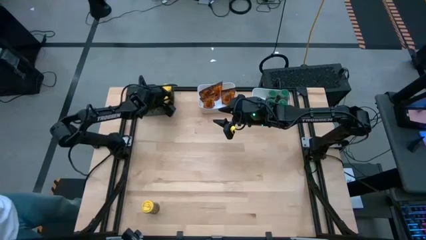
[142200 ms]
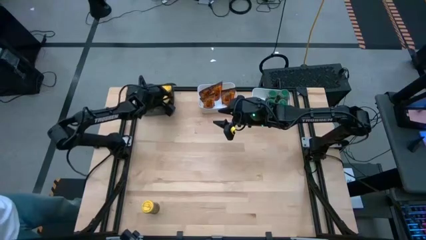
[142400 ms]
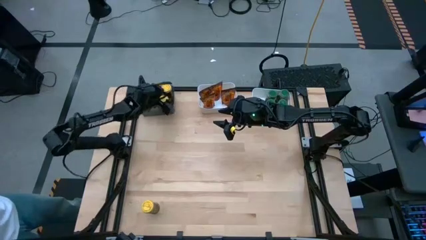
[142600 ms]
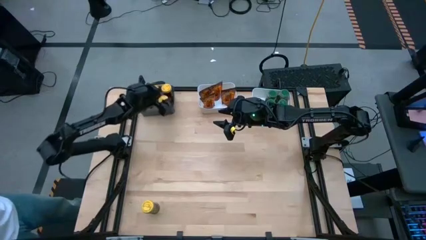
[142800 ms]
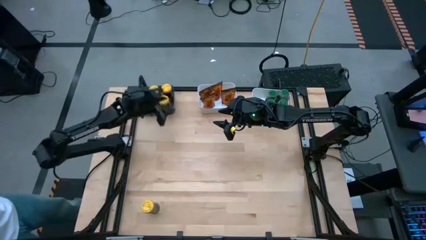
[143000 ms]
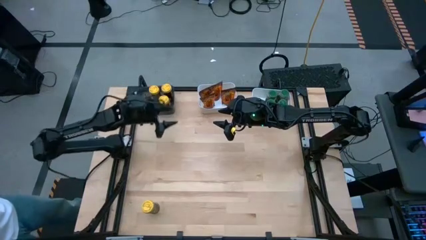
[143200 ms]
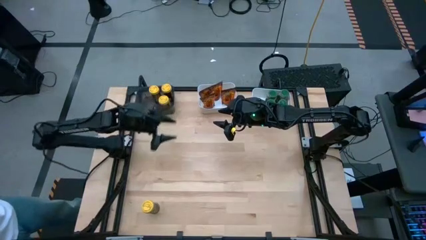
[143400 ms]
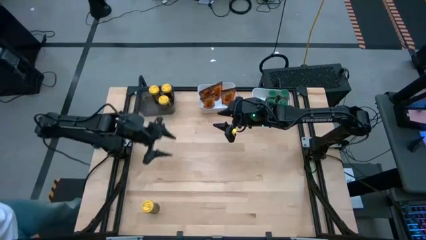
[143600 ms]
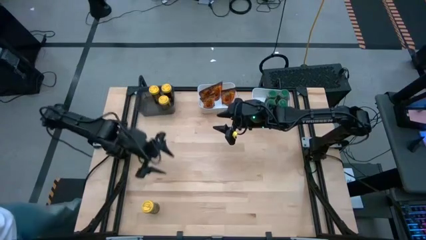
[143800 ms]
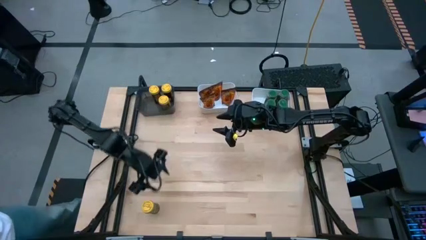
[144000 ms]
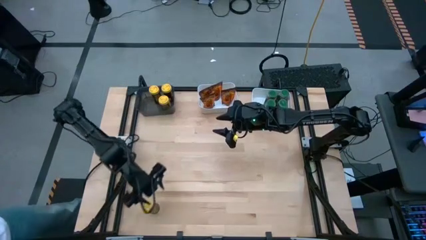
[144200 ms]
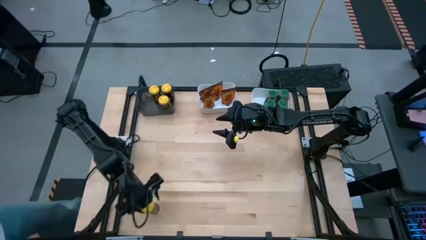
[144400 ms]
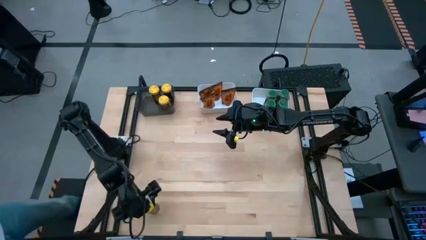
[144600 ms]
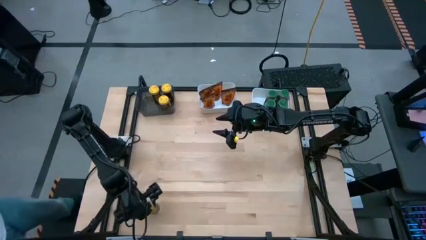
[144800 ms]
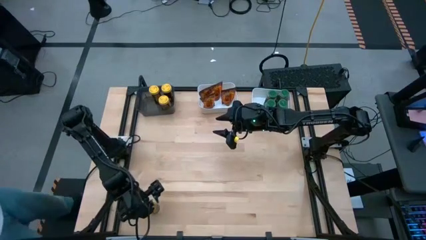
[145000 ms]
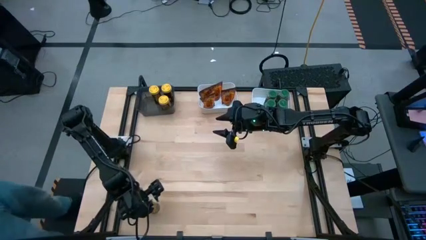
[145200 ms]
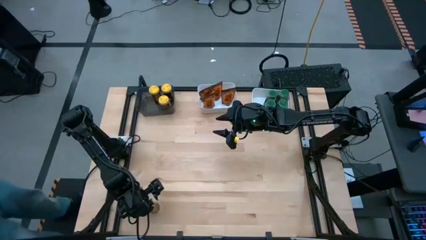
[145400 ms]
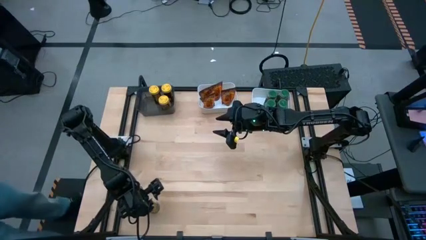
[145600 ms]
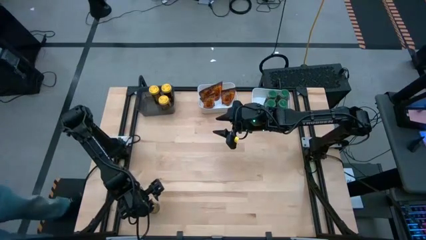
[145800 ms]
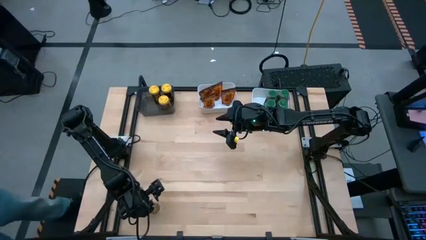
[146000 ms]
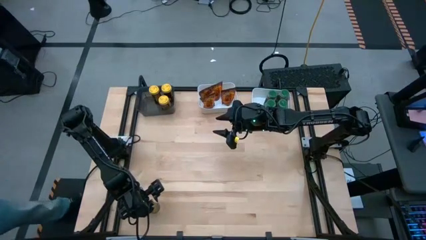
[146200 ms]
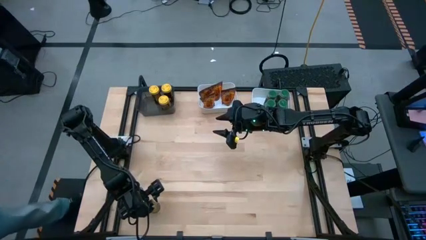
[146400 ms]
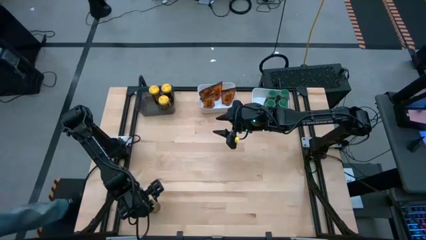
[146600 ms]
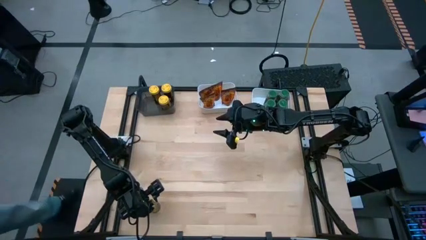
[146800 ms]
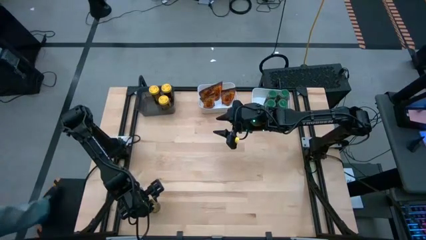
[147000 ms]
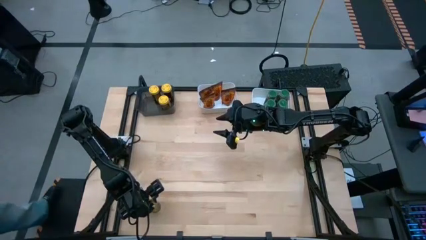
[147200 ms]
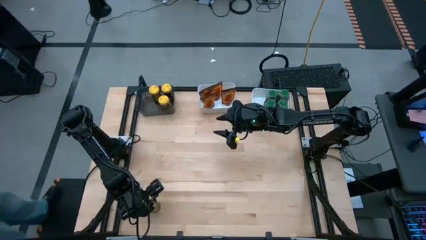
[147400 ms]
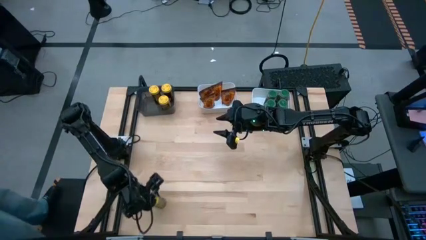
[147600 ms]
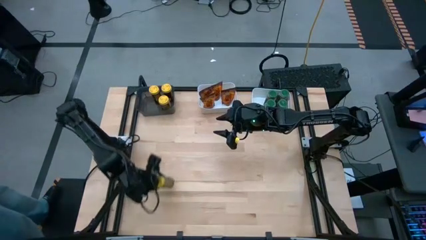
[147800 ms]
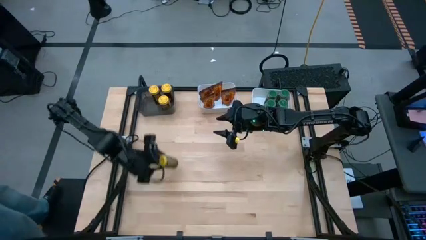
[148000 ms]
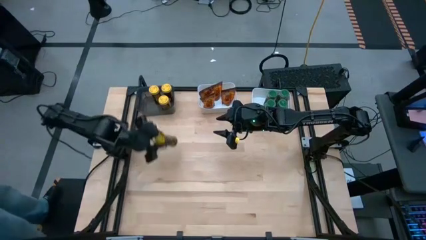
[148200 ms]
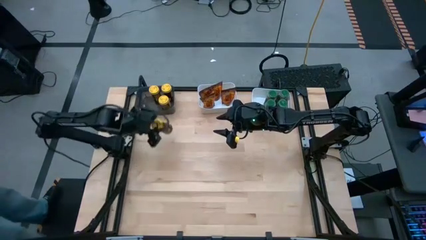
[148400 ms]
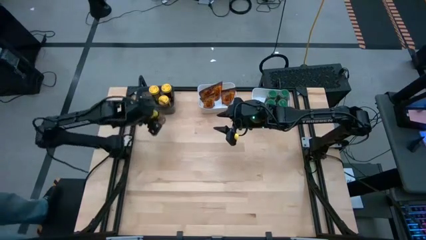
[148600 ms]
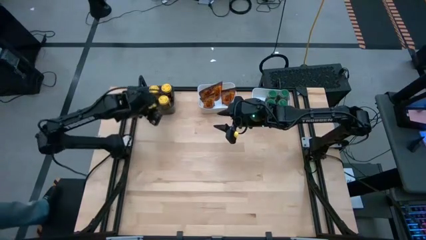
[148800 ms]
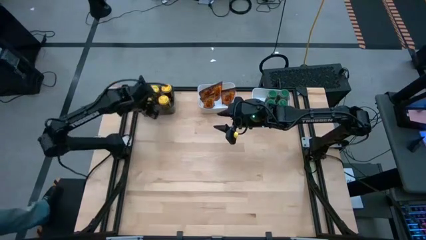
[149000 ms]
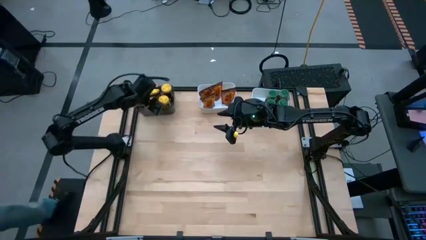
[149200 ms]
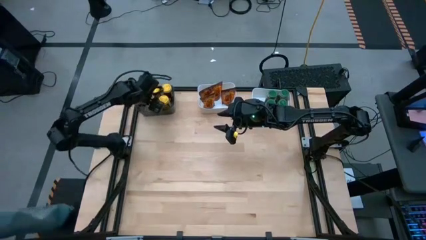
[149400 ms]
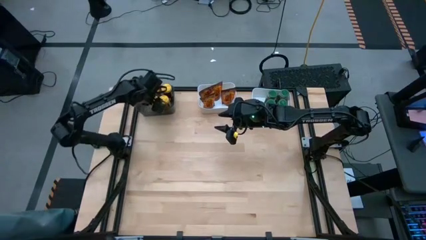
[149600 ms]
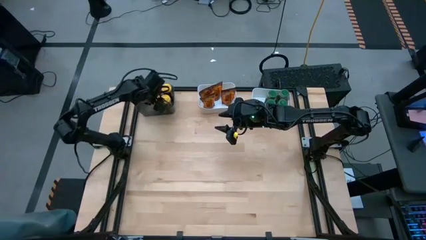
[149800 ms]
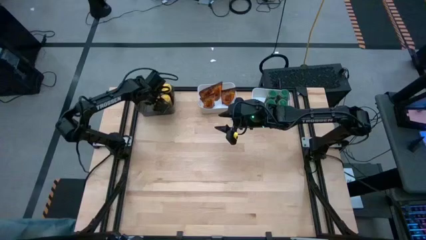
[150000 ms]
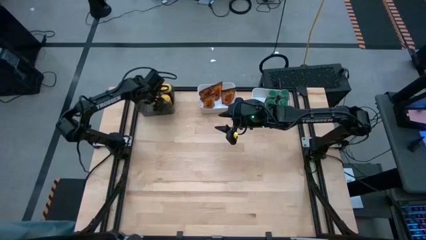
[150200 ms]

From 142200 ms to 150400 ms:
Task: Sort spices by type
Put the yellow seasoning bottle into the black bin

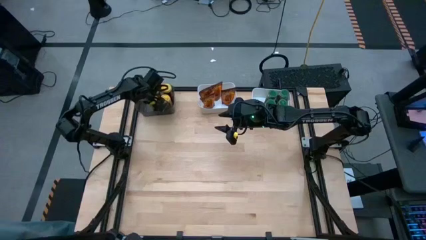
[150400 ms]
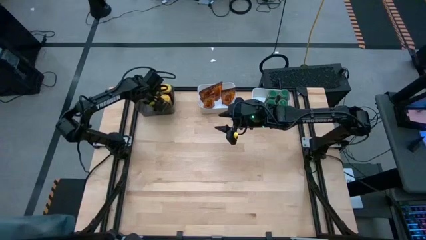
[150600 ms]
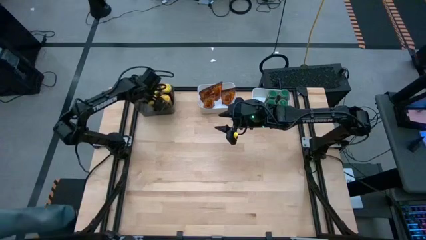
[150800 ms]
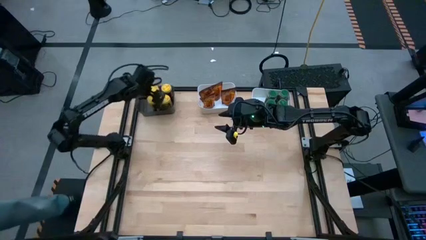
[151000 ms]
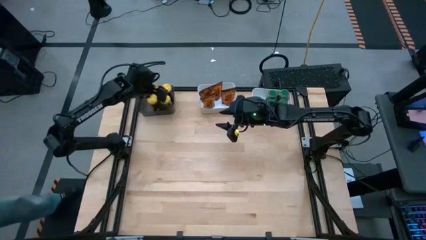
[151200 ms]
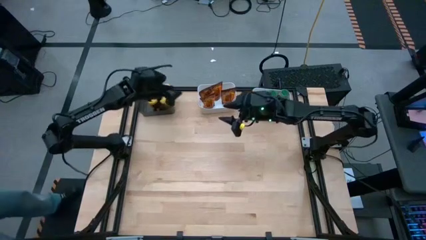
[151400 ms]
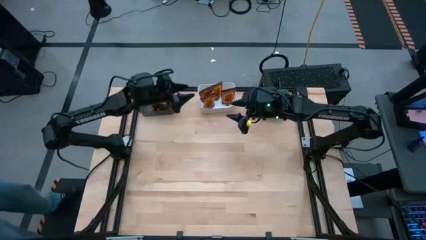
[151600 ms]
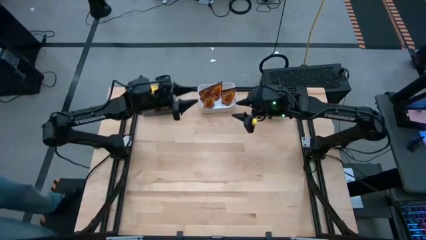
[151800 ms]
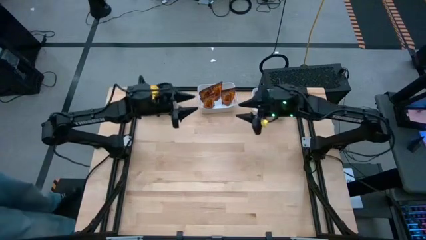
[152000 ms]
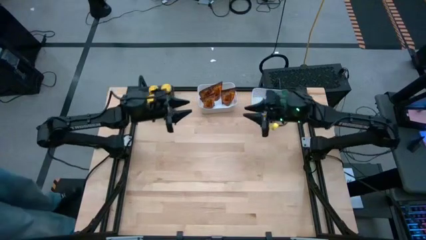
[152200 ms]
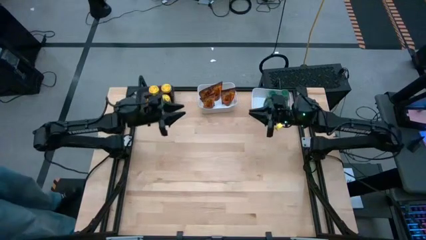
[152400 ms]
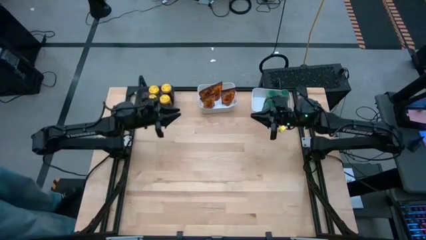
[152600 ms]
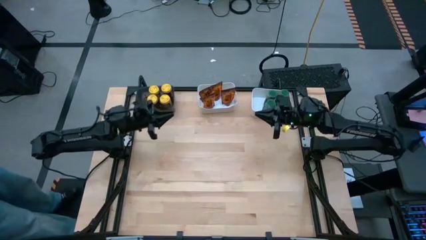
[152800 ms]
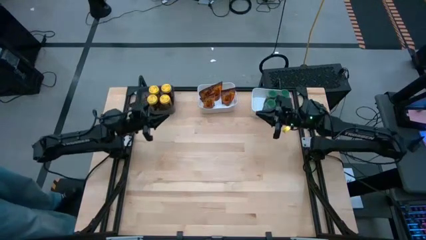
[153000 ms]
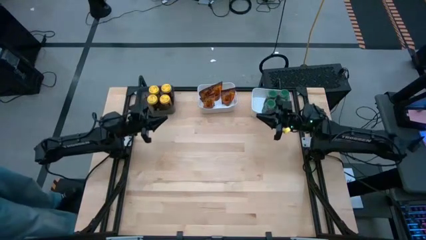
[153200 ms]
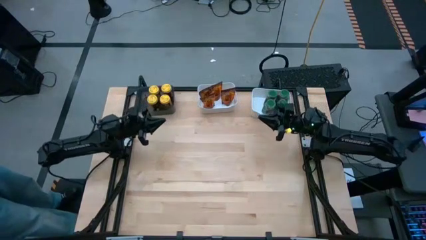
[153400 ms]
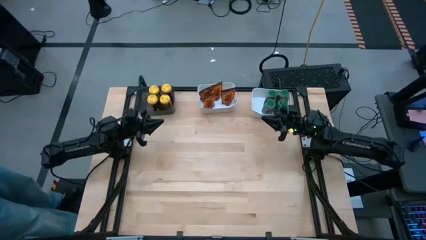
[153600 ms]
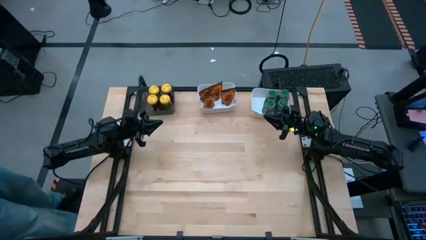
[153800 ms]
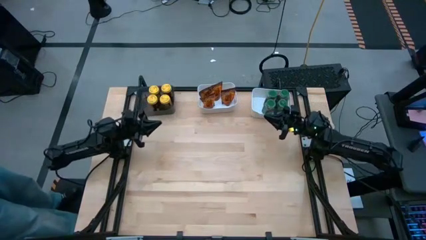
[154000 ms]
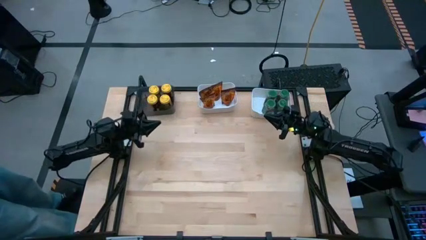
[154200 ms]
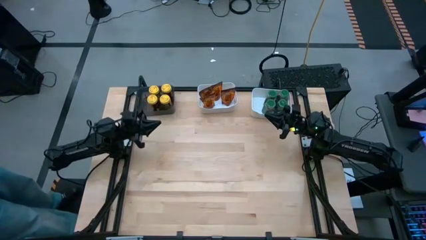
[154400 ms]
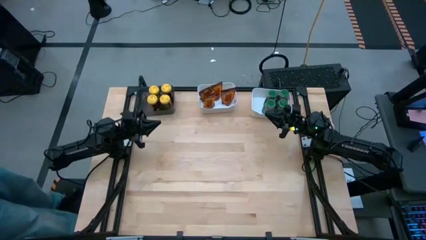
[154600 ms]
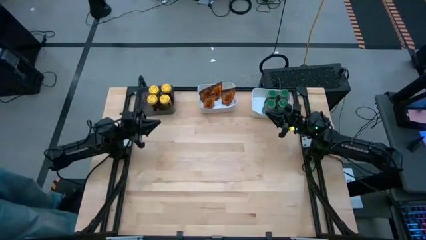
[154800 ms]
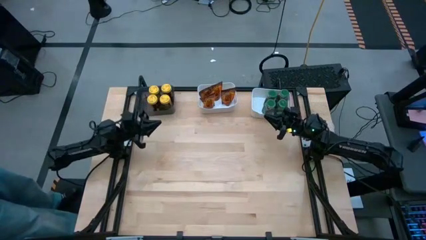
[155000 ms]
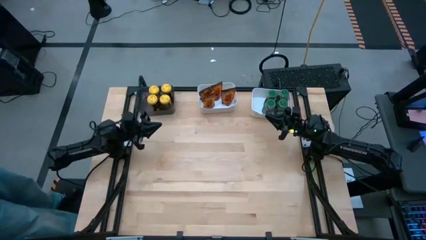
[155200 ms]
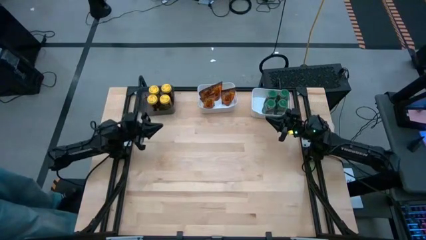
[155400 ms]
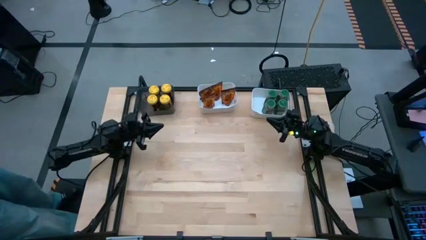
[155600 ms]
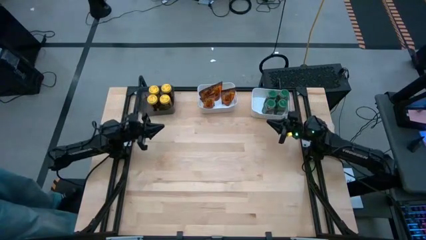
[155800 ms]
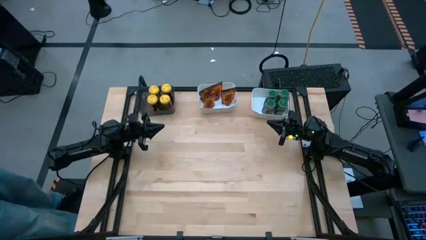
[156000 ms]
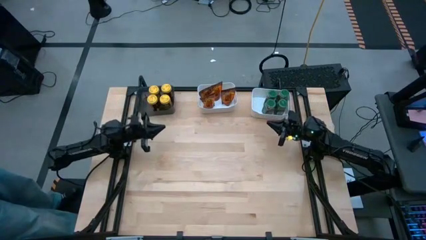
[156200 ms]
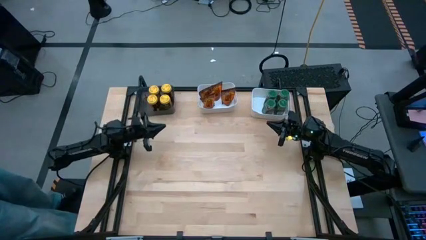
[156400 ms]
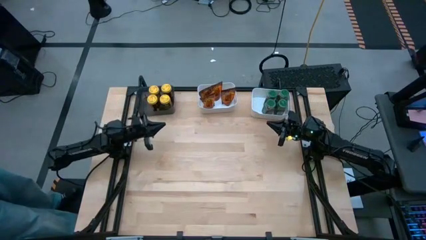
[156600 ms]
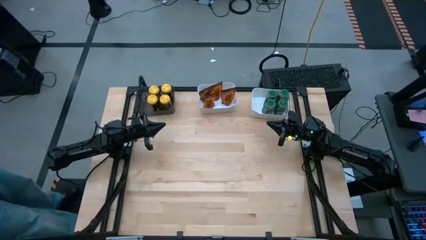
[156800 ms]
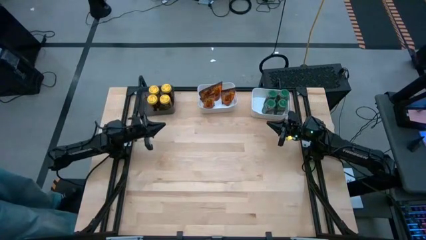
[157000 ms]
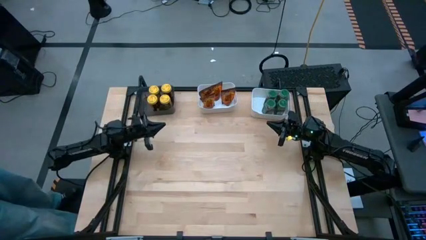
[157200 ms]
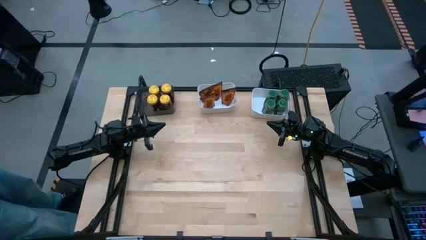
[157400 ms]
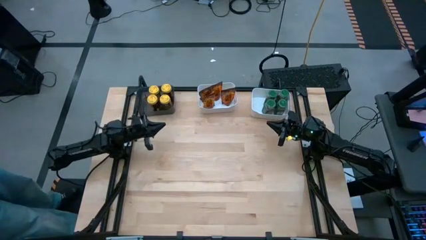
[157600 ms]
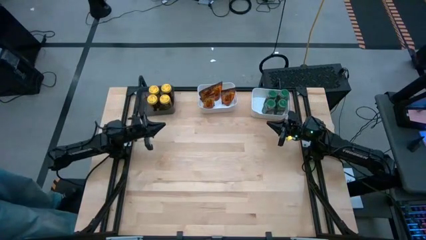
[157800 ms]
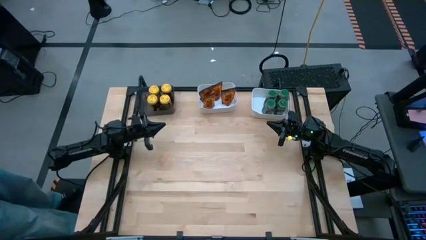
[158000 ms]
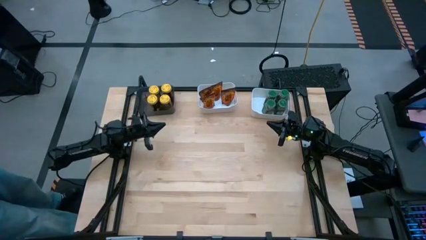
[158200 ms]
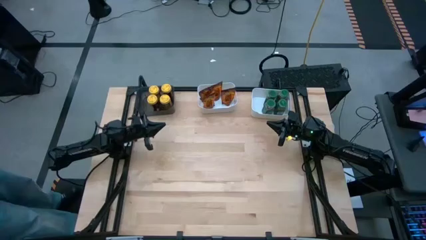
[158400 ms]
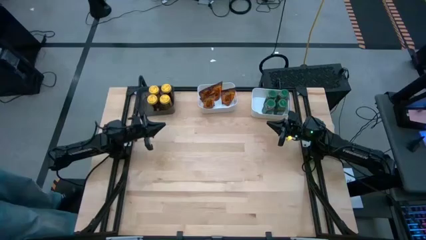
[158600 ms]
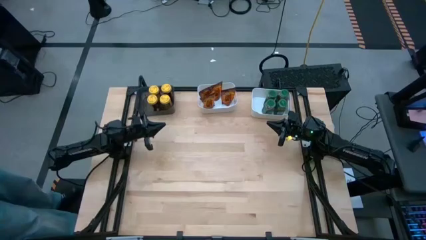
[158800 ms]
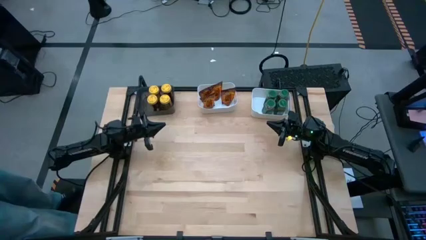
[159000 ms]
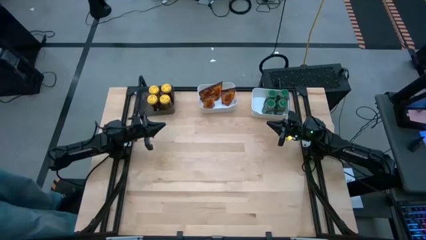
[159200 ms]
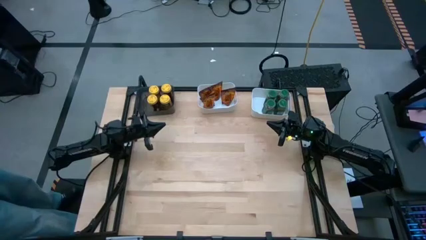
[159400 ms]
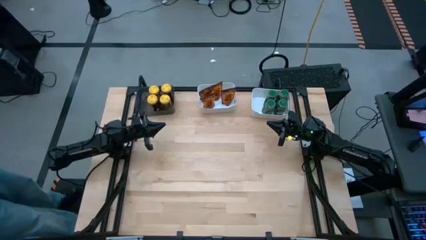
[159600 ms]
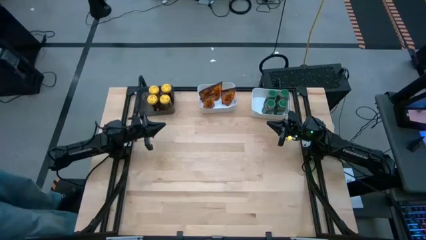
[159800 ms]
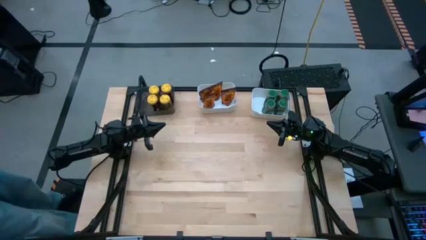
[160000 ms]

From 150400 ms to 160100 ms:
Return to Home Position
